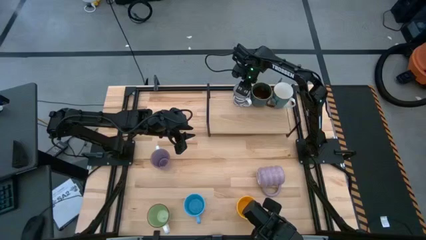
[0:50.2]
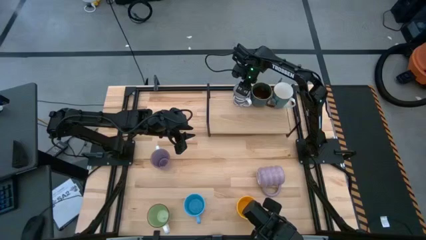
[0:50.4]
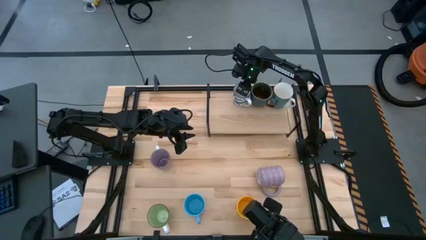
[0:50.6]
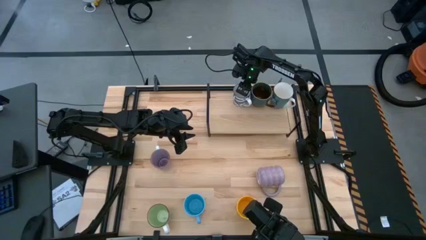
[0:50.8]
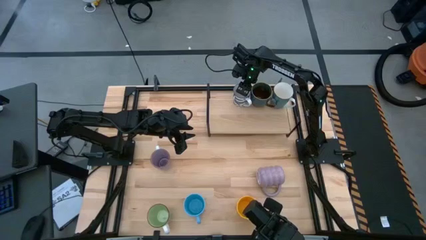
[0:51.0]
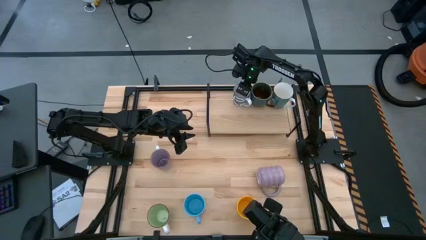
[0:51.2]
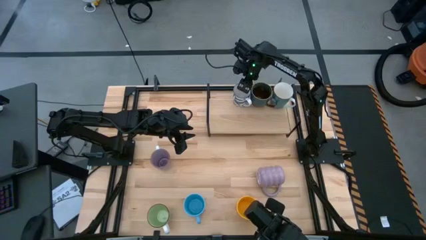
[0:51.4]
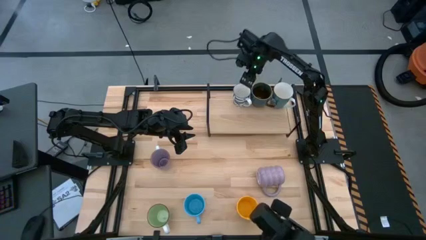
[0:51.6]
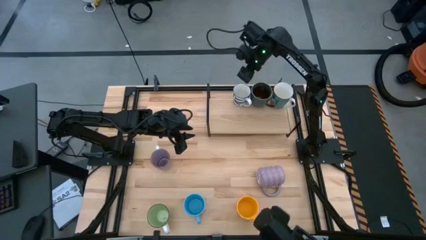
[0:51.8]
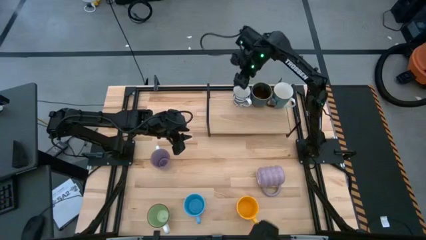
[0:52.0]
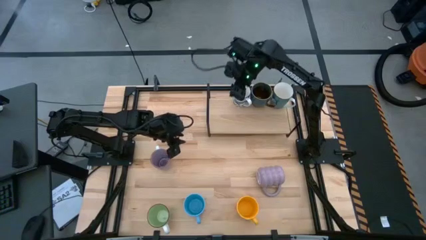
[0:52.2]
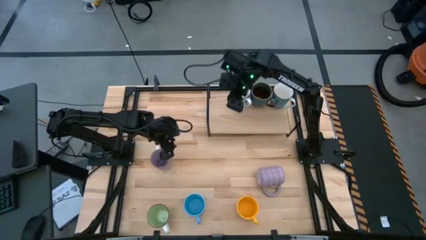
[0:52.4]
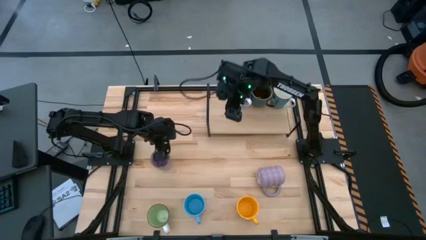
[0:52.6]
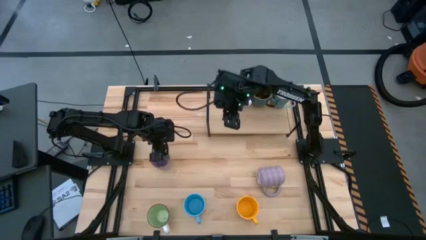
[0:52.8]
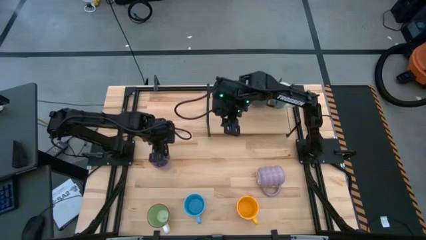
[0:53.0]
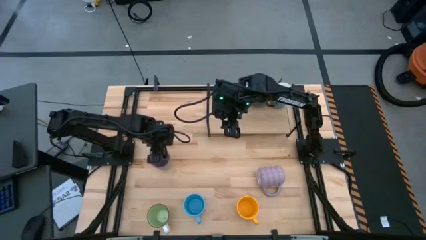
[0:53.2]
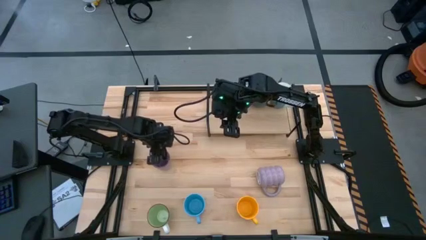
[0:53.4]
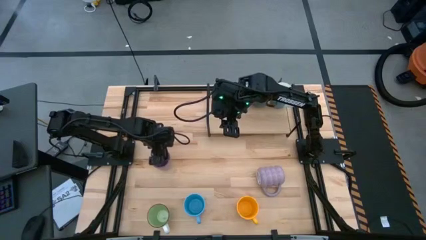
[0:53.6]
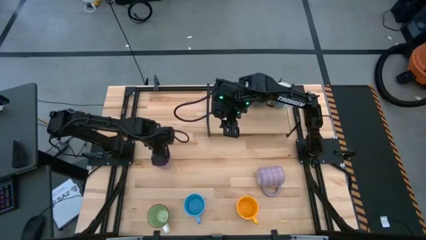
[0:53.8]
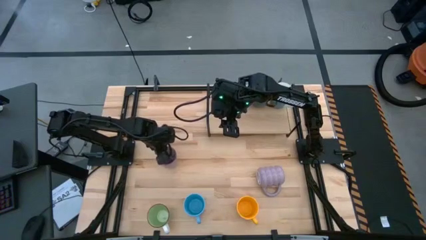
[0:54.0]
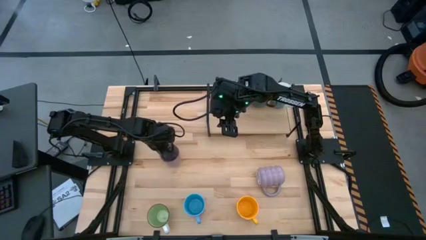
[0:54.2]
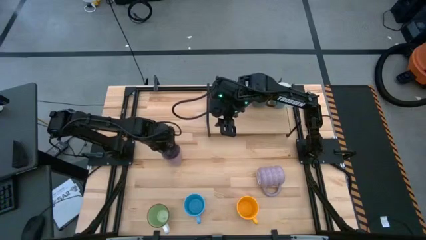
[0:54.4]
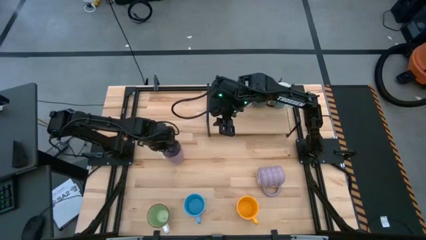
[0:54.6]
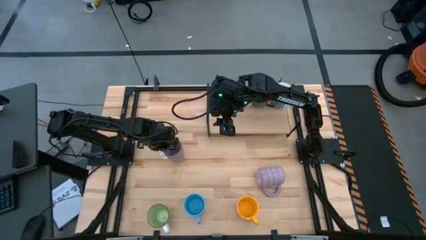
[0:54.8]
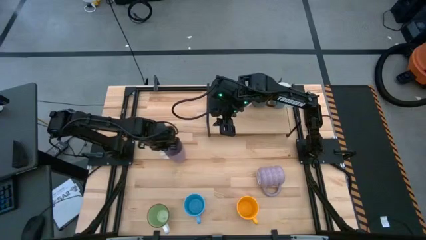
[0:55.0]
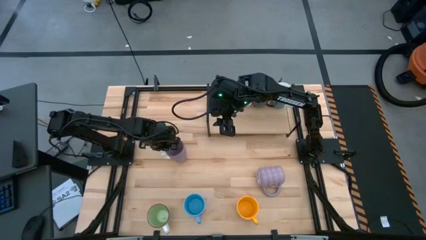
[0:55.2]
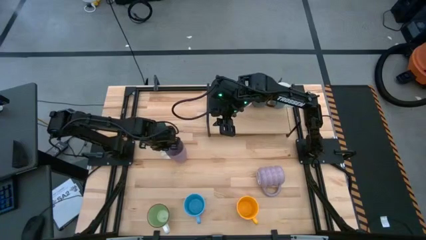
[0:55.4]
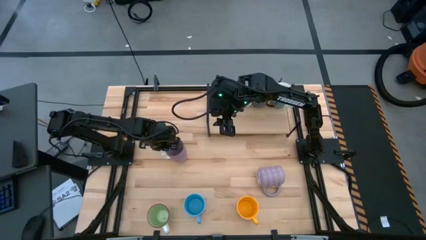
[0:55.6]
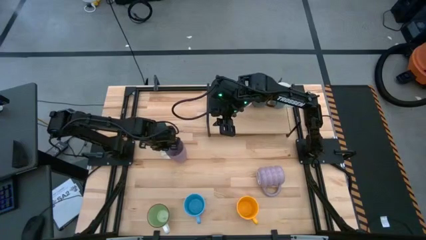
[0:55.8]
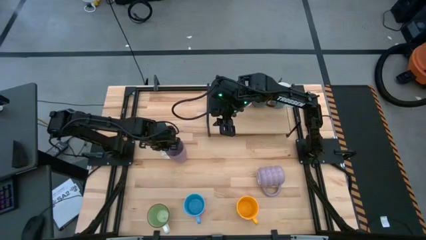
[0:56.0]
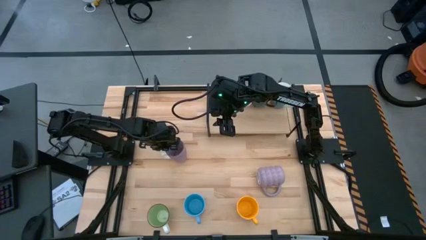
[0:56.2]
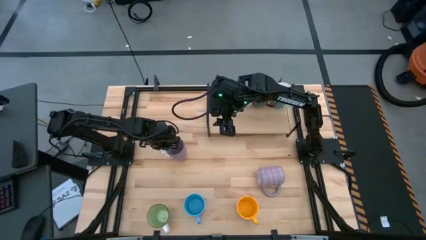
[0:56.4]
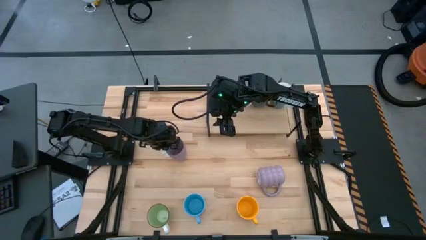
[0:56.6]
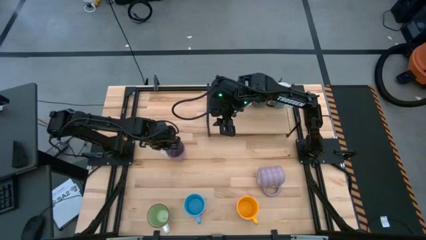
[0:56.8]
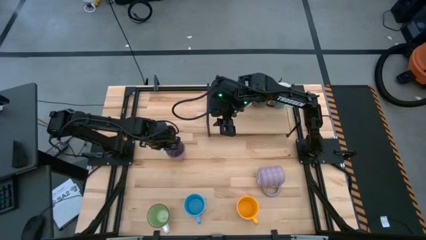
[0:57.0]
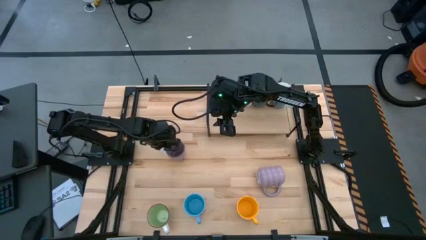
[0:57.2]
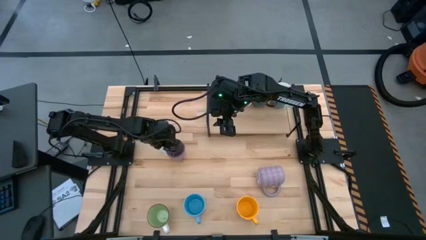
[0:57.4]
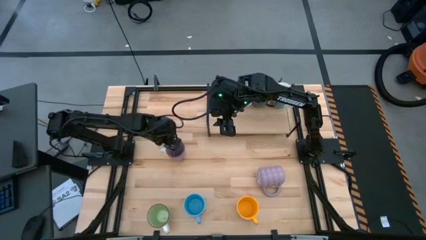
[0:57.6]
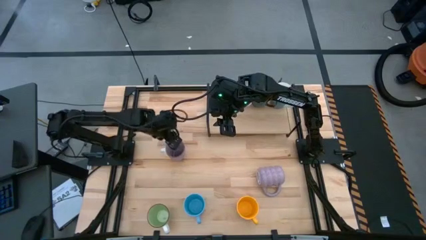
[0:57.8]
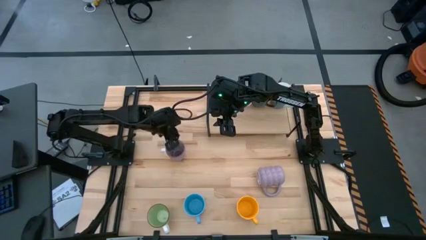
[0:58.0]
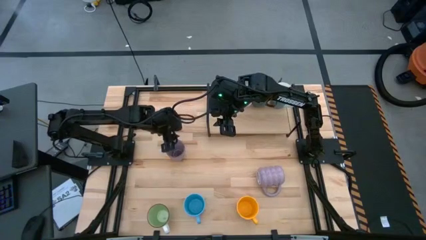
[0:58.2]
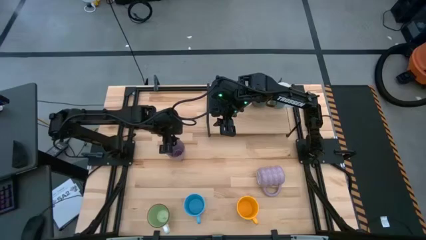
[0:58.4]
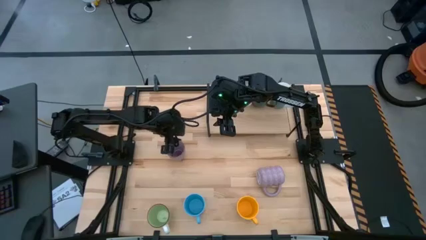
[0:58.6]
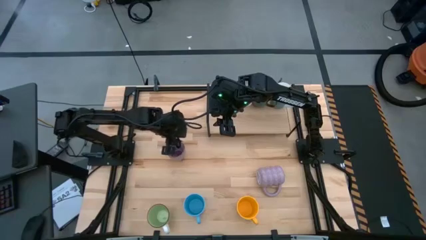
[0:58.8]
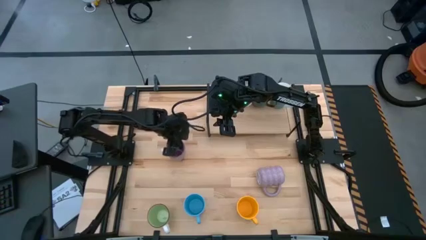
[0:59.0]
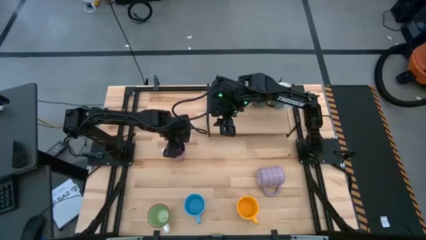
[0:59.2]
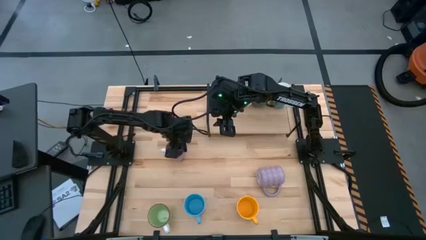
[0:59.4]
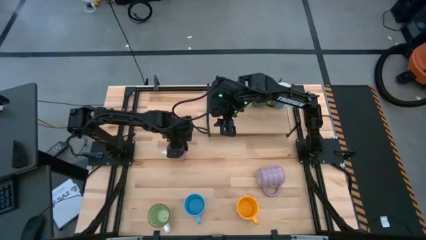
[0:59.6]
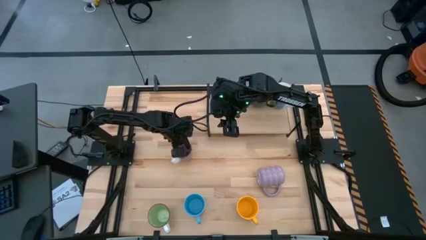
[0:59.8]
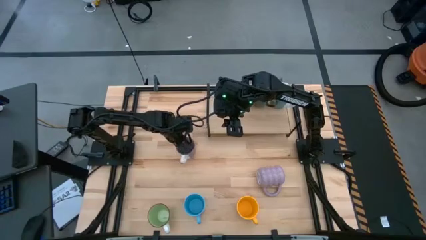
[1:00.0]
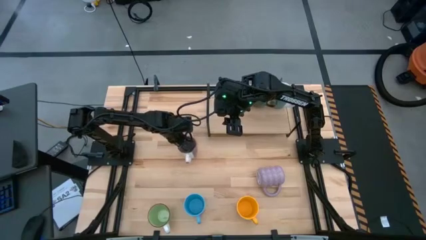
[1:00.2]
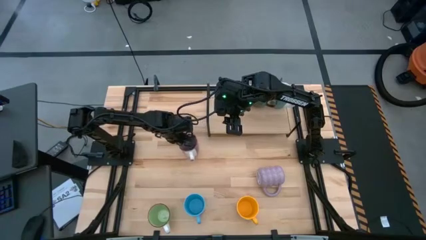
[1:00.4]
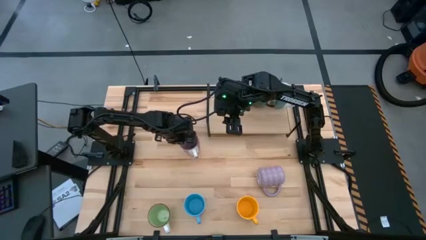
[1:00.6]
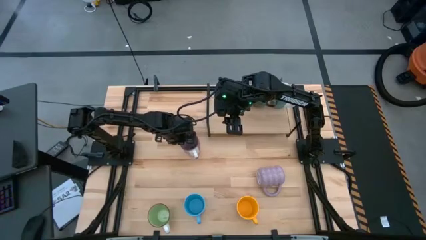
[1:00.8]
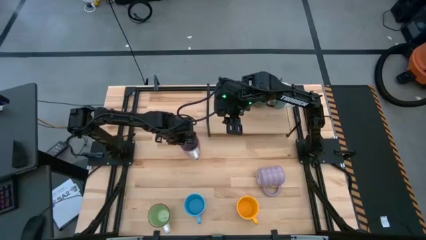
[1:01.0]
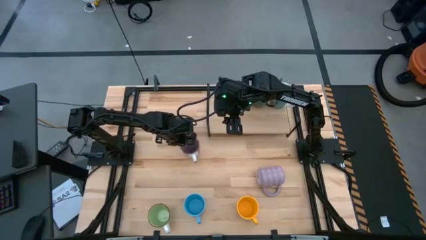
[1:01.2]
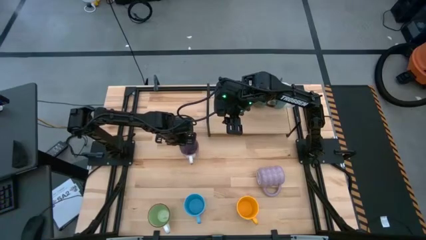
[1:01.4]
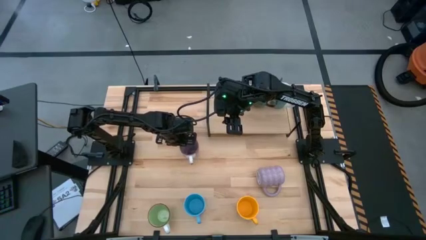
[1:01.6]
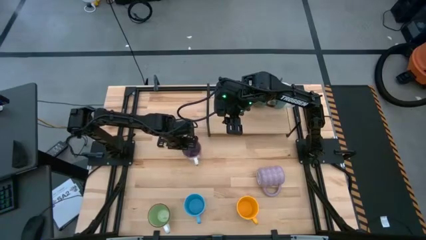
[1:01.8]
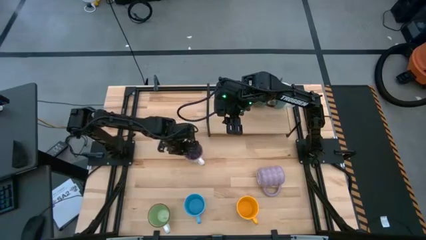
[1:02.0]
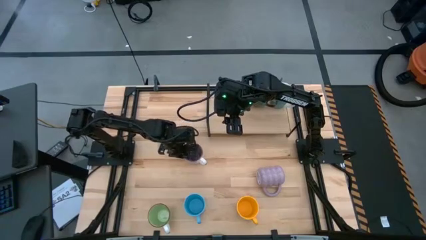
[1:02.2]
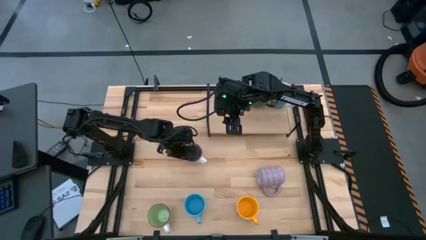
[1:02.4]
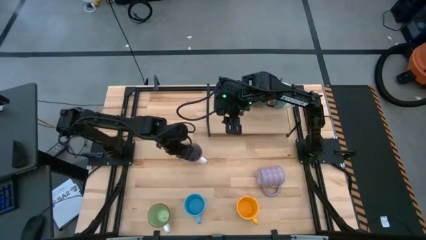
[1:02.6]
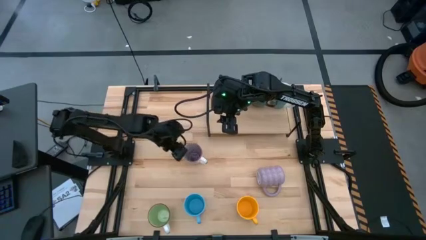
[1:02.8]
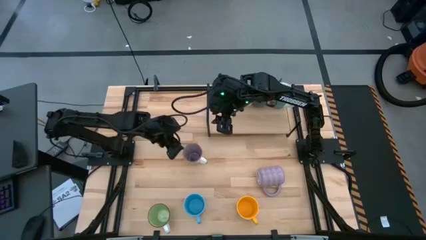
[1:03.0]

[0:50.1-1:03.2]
Task: Place coffee mugs
Put the purple mug on the shelf

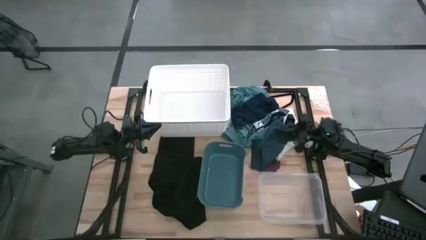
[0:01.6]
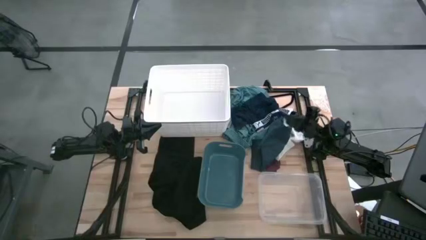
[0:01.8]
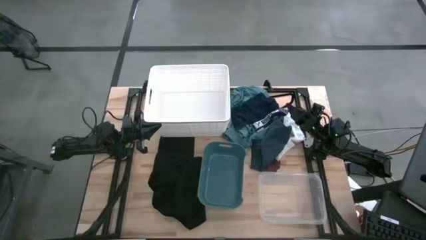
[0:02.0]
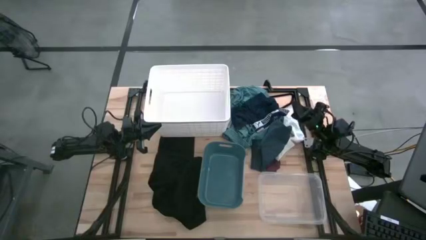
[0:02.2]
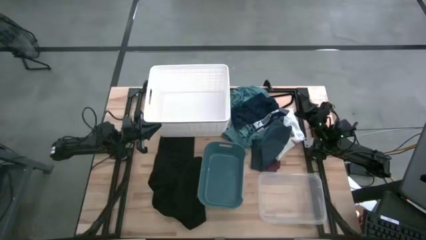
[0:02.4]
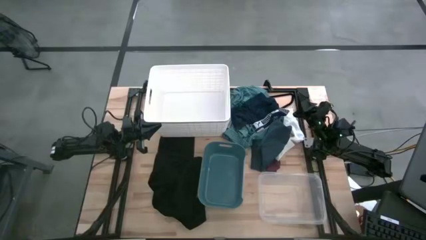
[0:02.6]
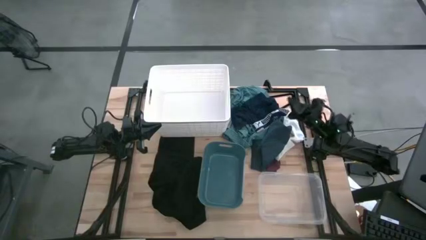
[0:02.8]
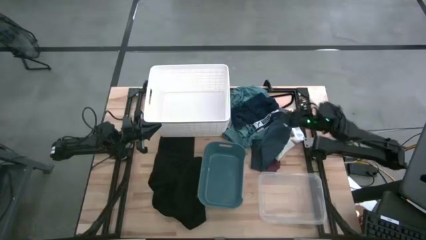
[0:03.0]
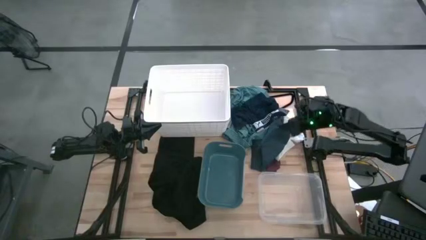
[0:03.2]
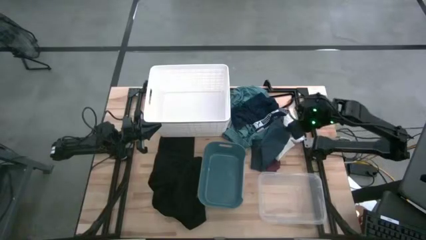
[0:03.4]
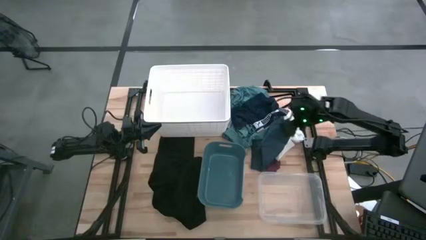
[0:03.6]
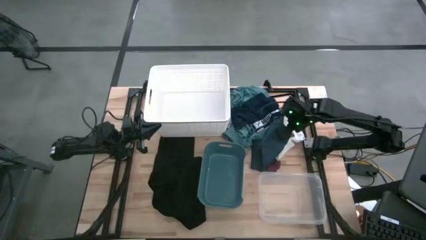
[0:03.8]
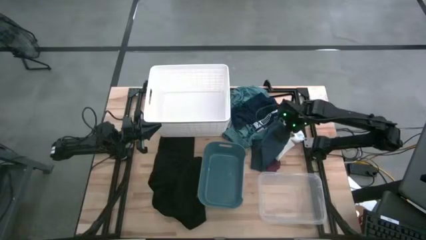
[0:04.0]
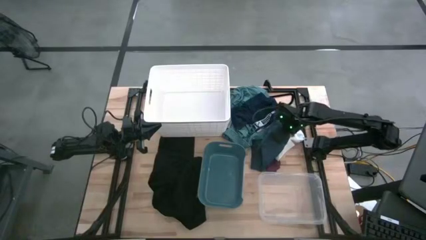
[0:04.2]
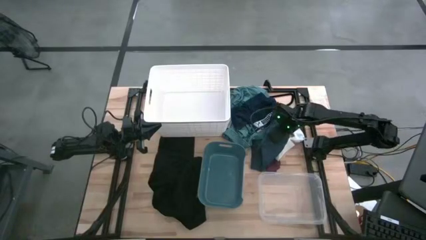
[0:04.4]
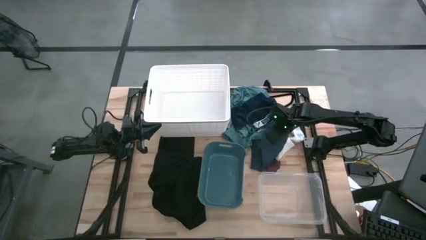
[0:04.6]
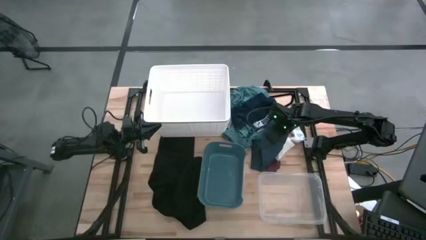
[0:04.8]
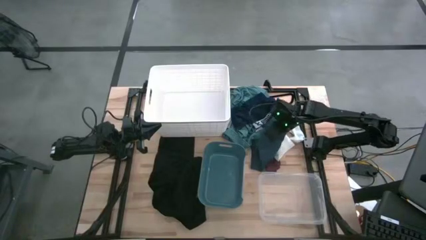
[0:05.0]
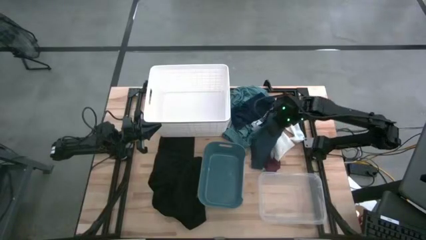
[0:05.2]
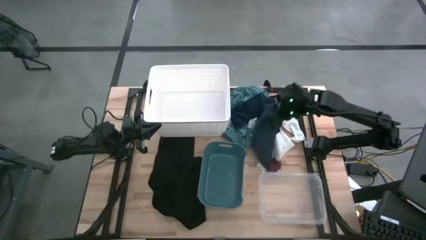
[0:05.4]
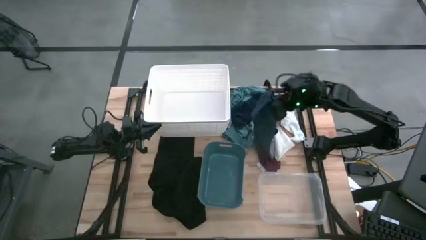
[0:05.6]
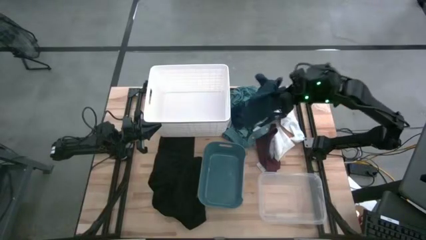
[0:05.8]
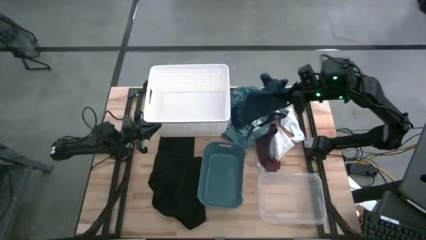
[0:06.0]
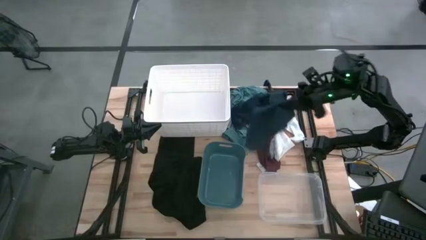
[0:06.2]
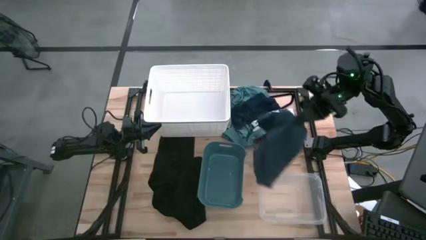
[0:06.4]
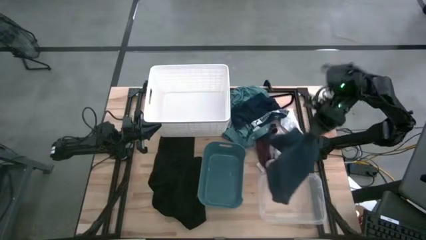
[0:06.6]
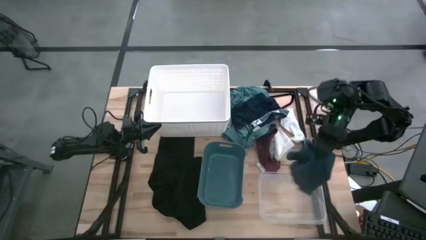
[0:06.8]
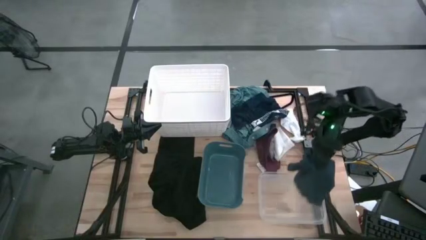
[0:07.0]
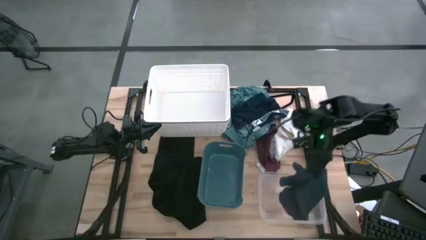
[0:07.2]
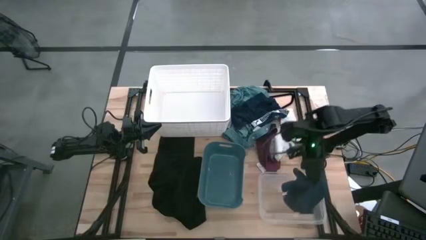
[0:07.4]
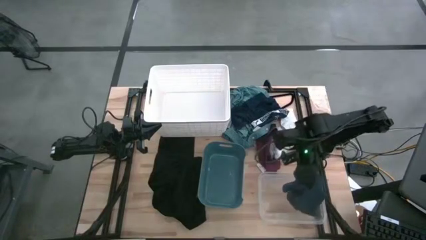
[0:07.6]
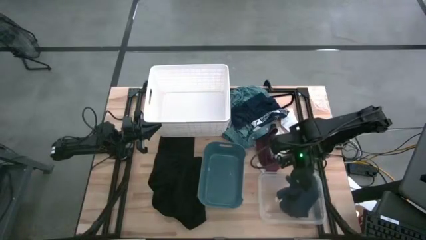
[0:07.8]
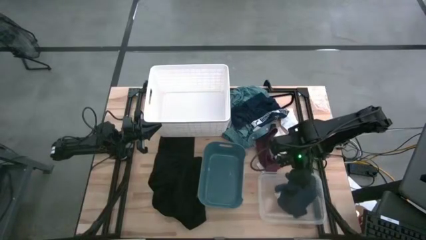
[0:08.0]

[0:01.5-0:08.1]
Task: Pick & Place Cloths
Put the gray boxers into the transparent bin
